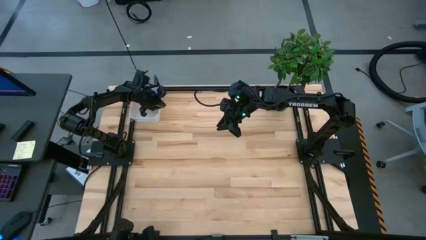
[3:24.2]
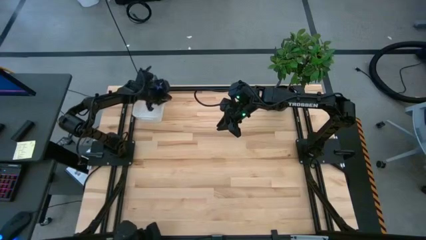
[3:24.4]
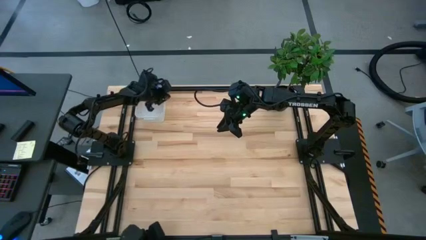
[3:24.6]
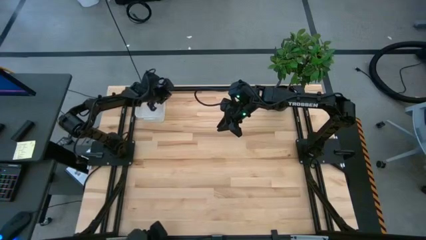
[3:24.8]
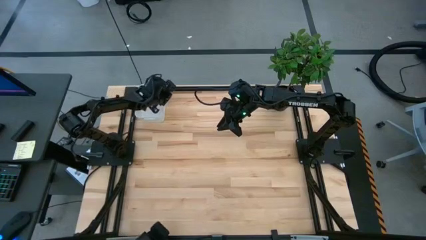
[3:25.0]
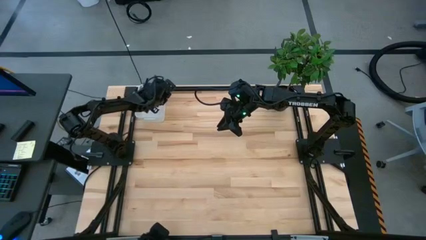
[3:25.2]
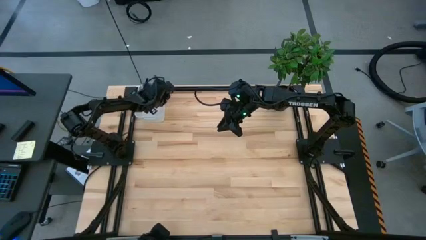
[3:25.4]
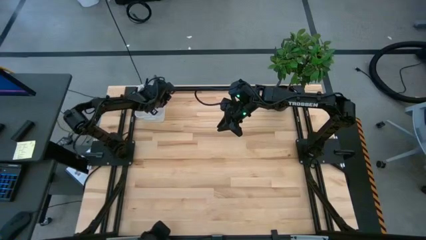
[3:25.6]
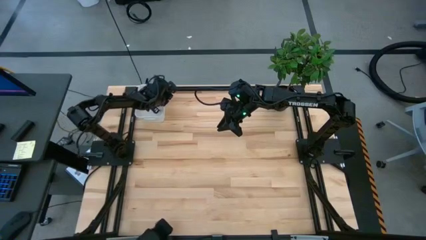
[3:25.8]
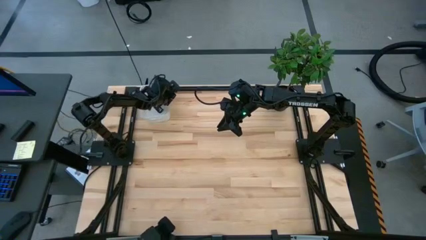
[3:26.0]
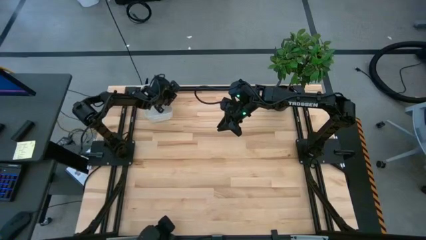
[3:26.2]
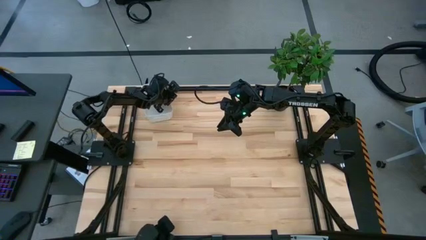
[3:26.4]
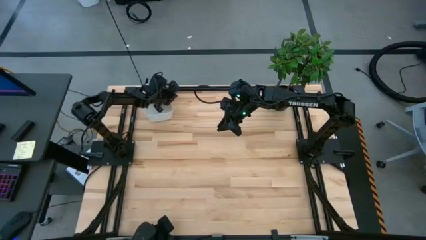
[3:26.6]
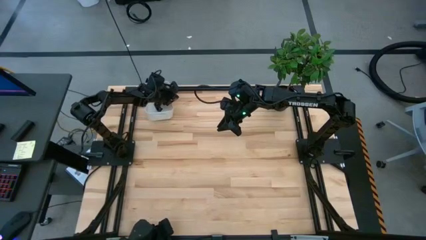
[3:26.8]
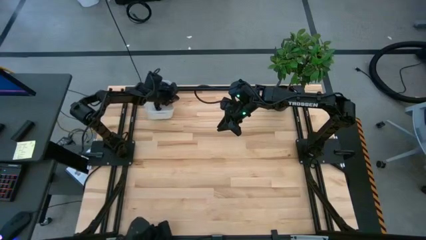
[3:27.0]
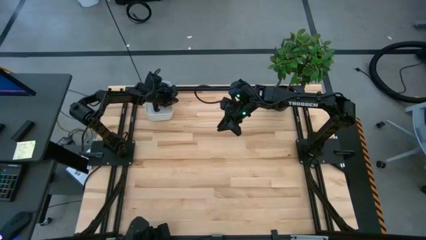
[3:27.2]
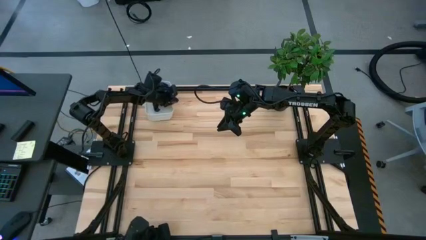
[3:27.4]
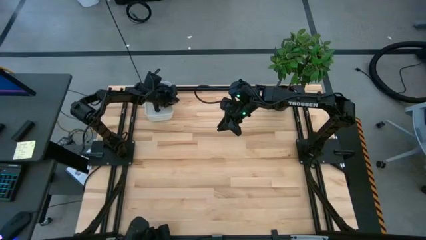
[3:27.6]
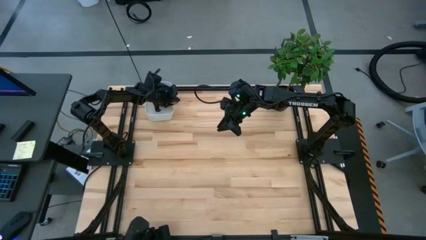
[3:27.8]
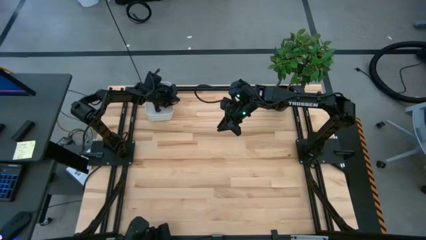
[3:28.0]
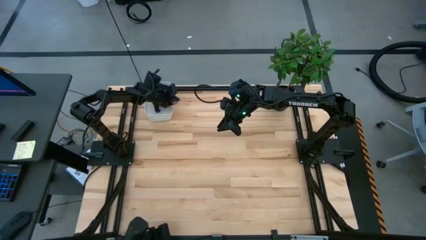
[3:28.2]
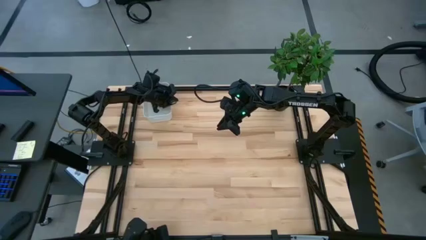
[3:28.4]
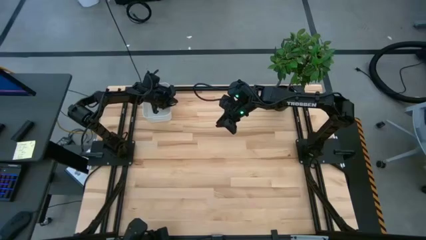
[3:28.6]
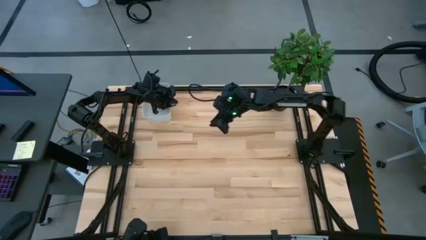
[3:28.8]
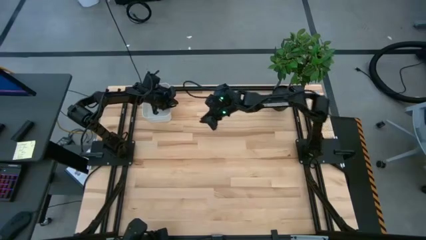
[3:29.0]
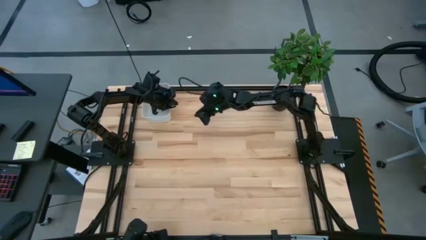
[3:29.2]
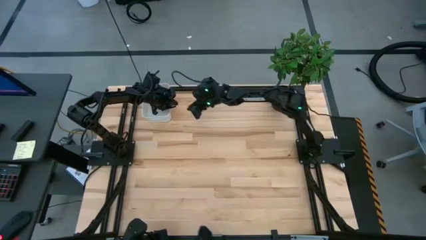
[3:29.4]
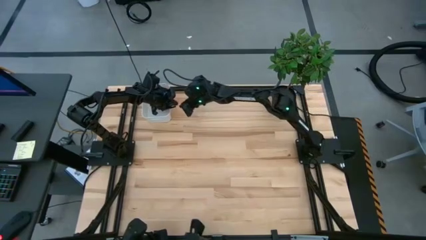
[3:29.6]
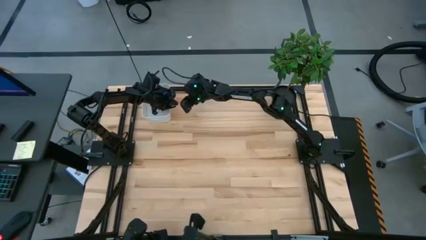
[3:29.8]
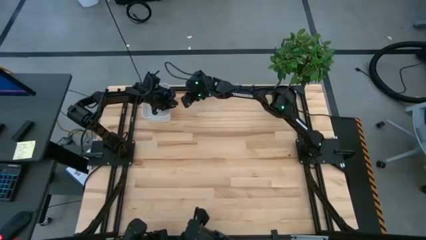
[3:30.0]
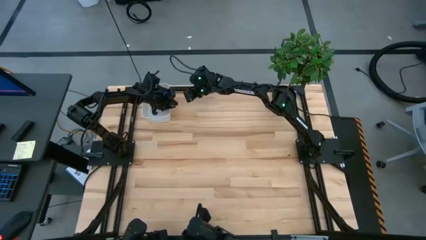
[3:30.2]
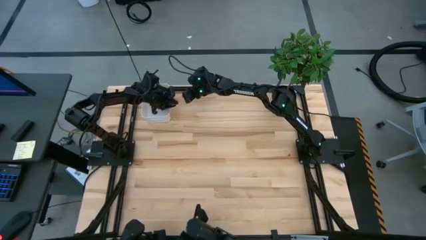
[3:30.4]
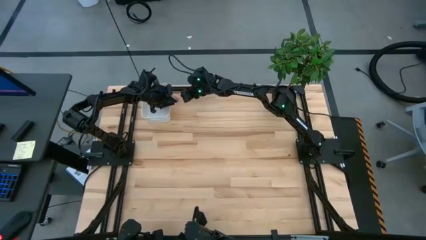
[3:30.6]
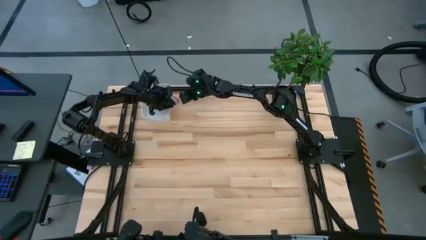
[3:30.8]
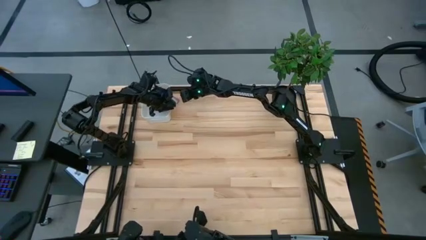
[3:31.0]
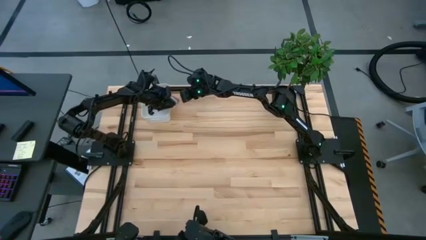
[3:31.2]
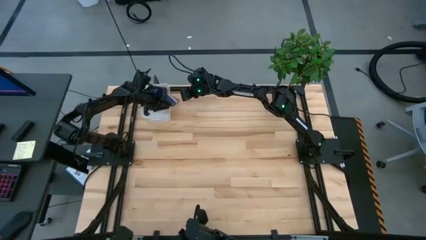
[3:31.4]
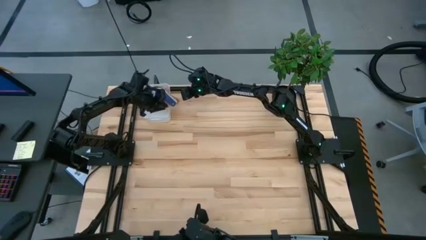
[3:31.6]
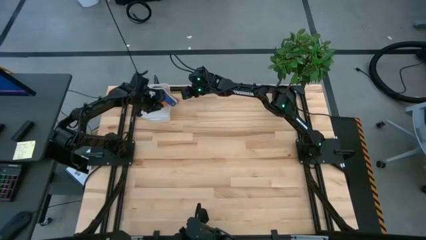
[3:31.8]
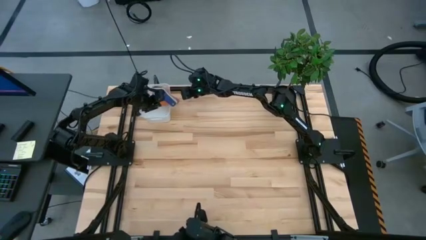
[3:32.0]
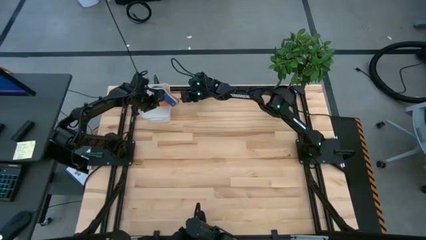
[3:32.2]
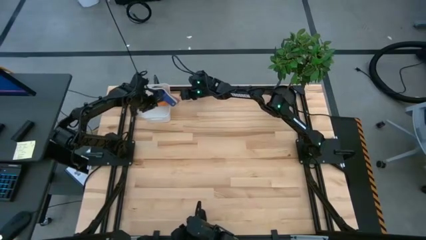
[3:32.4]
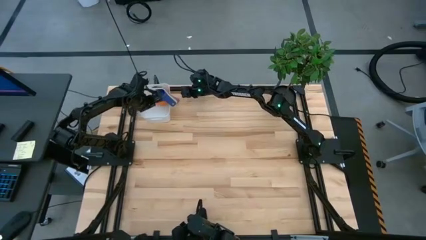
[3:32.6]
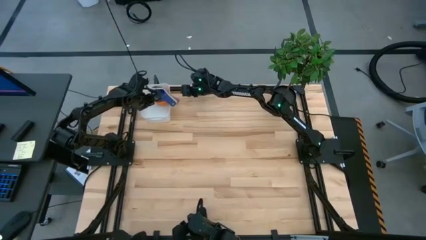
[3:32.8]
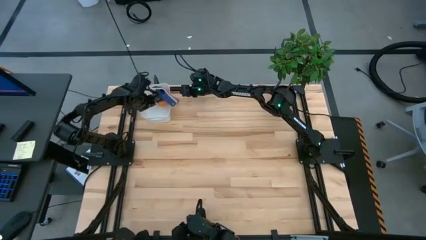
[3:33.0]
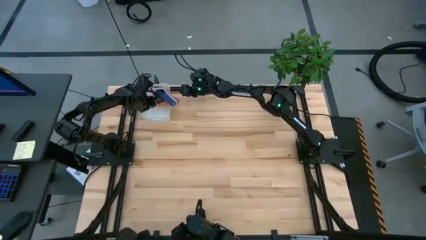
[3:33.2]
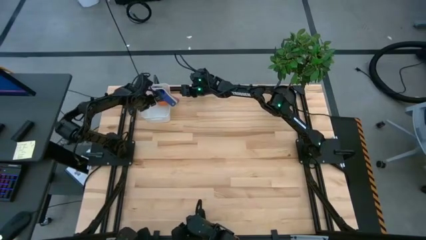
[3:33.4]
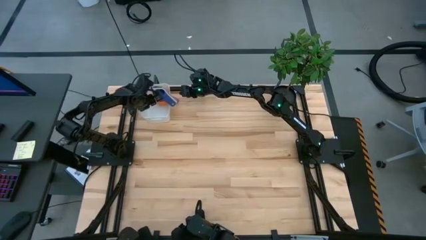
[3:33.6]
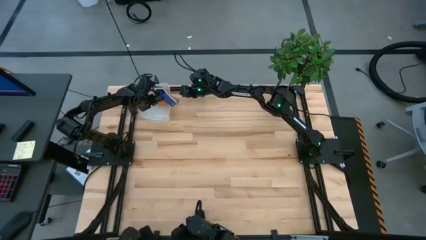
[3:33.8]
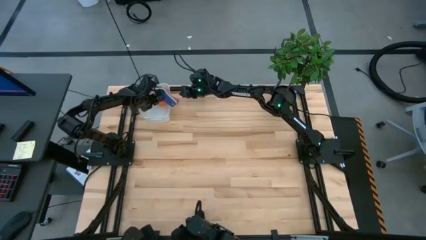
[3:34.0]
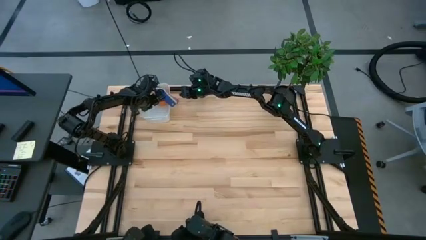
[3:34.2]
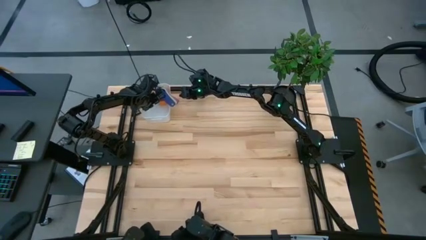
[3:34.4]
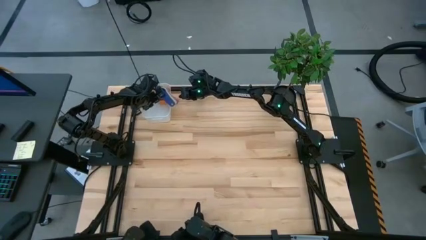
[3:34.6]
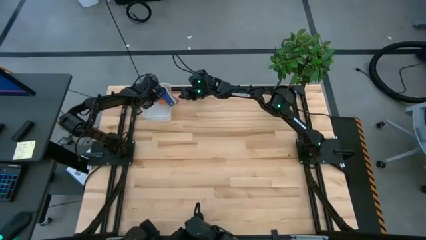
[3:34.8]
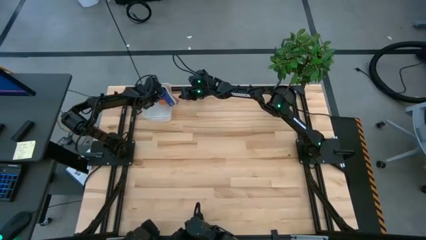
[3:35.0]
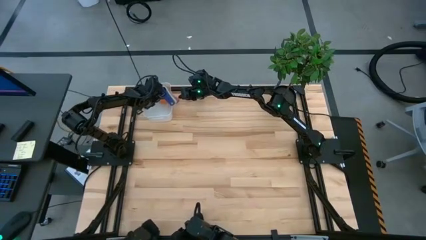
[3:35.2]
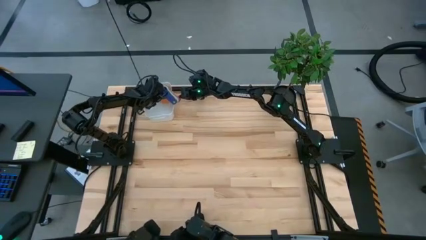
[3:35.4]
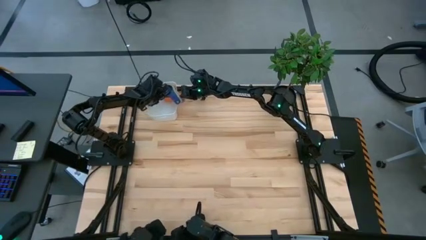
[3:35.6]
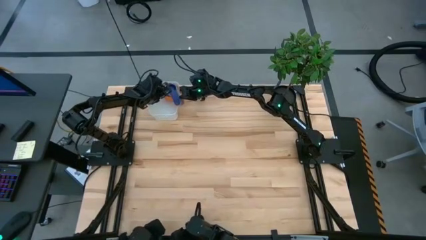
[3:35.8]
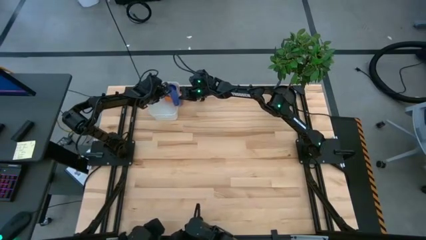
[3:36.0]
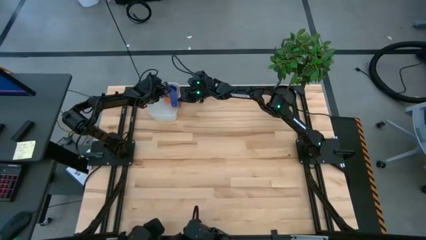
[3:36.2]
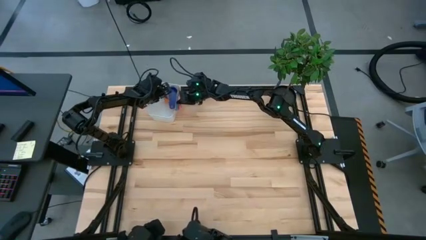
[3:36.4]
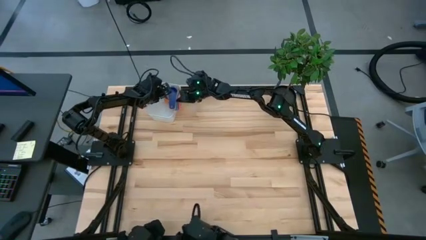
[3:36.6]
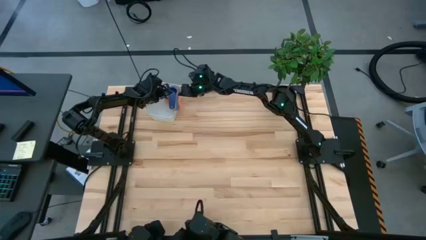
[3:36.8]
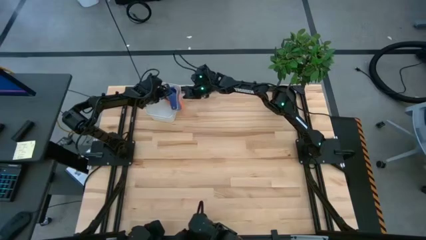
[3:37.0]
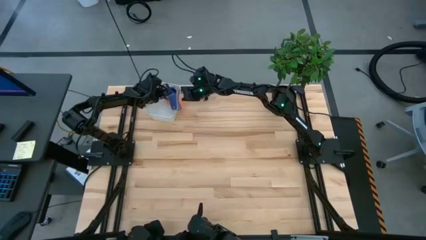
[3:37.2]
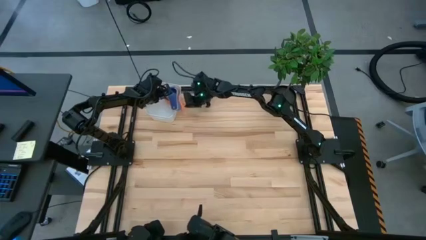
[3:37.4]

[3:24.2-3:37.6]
Task: Nest measuring cups in basket
Put the nested measuring cups into the white bin
